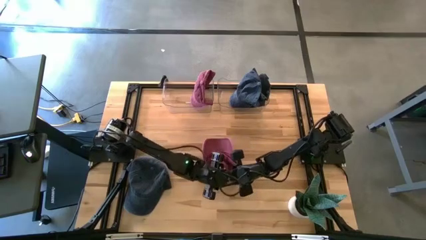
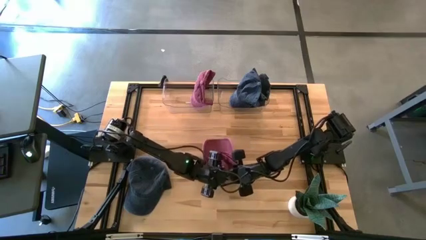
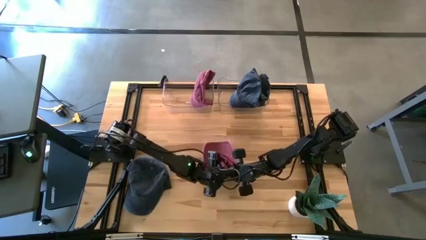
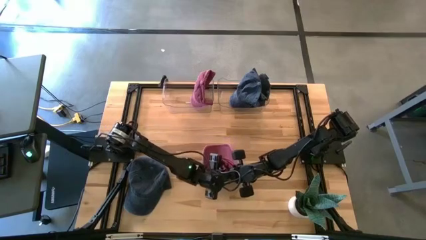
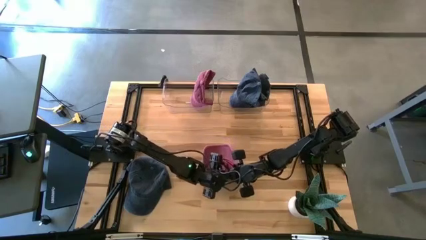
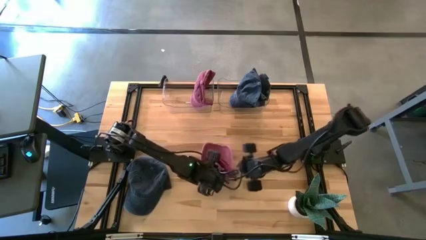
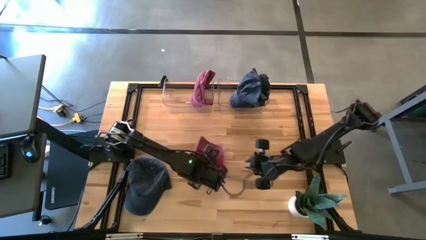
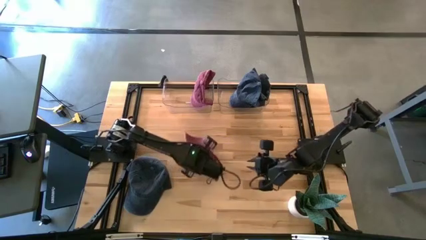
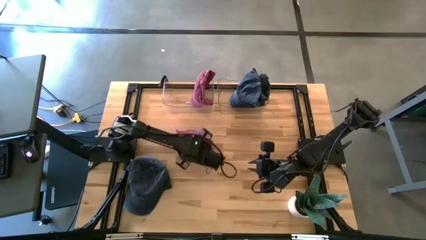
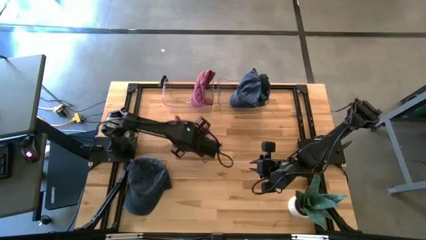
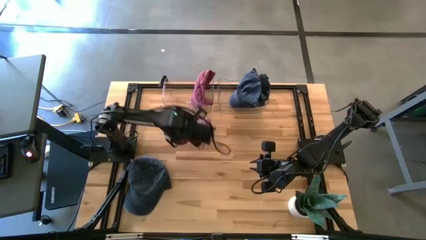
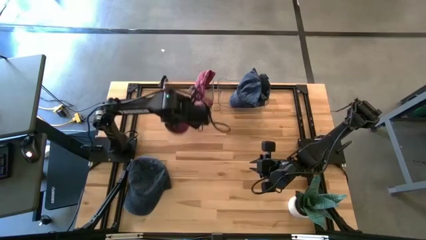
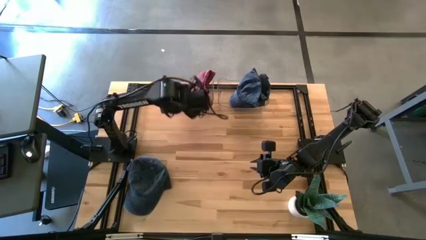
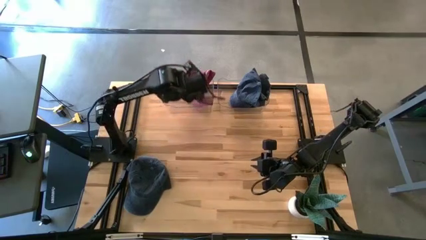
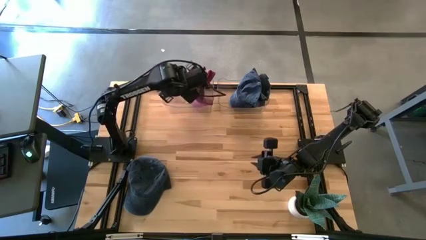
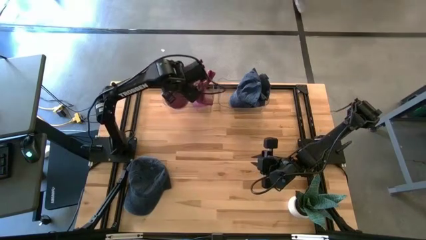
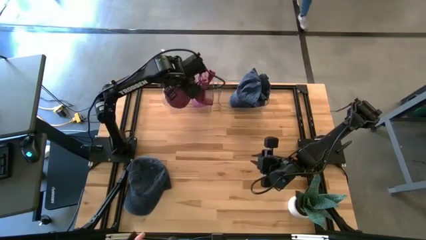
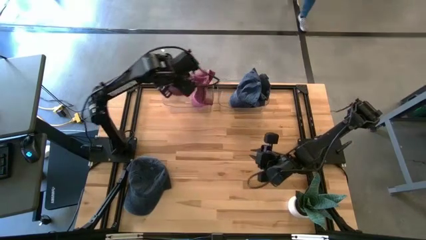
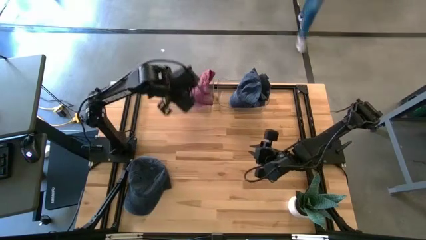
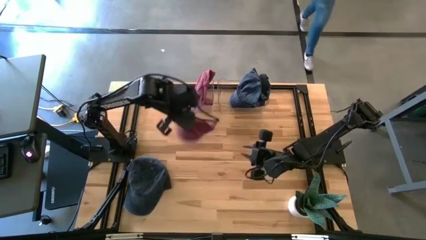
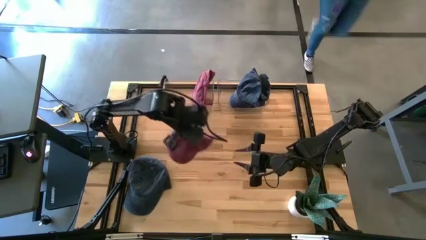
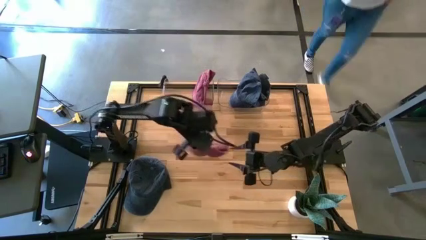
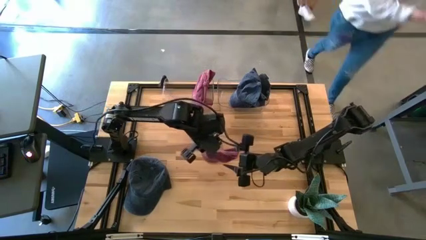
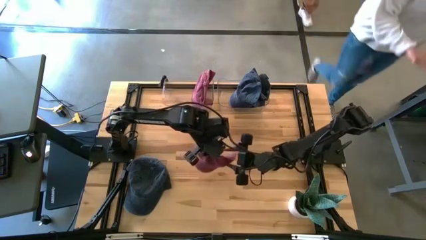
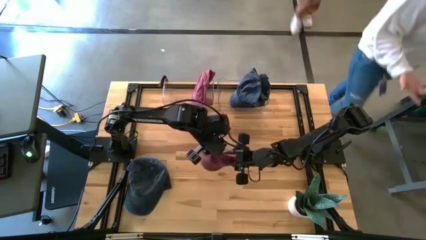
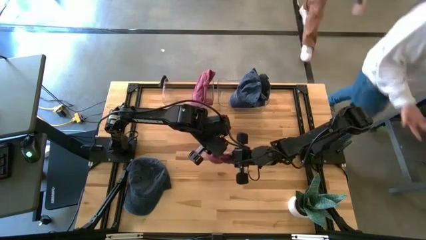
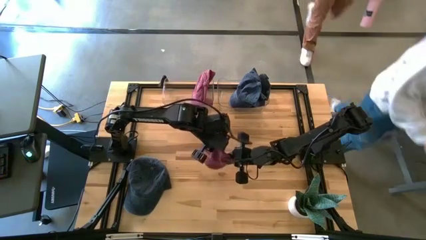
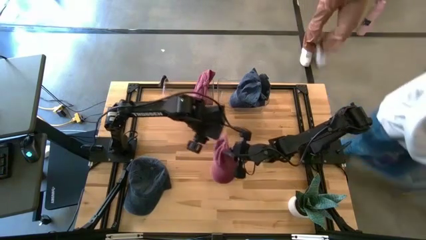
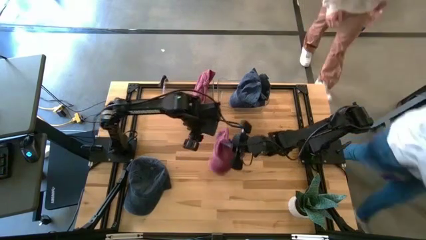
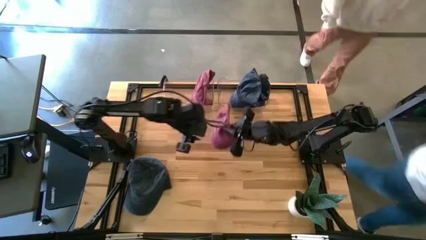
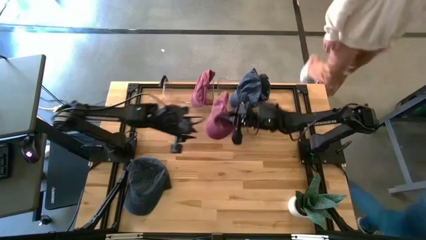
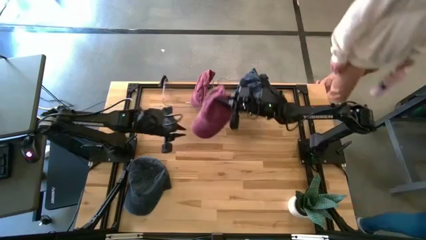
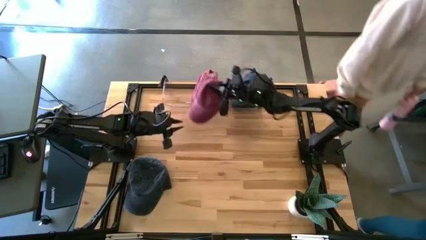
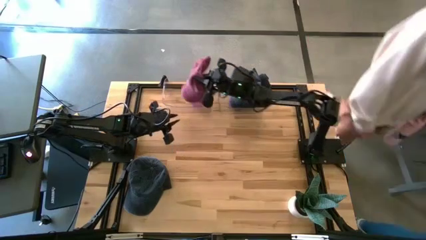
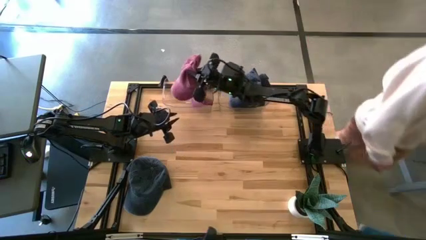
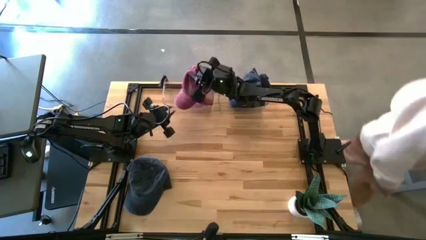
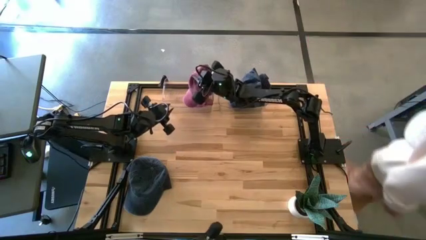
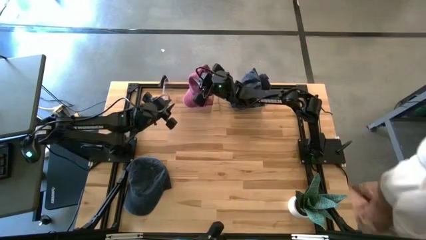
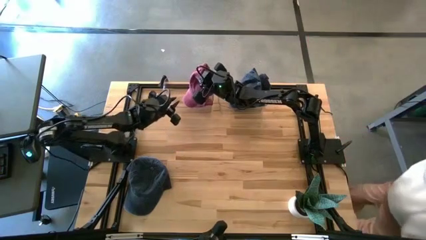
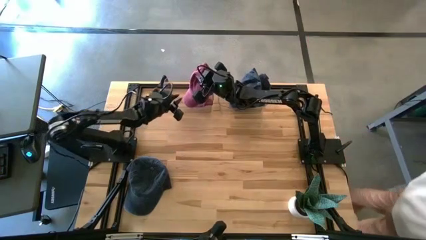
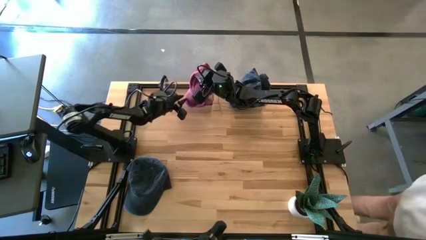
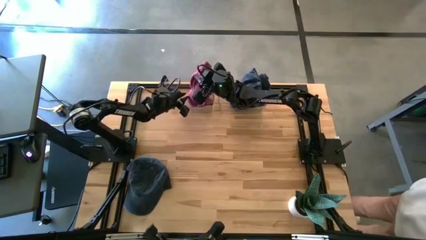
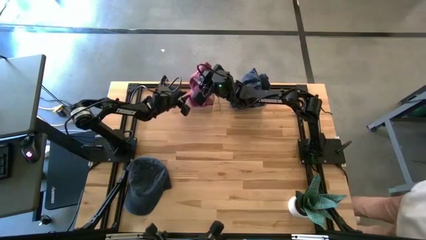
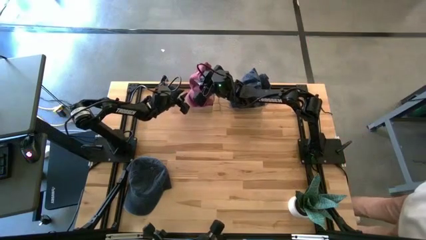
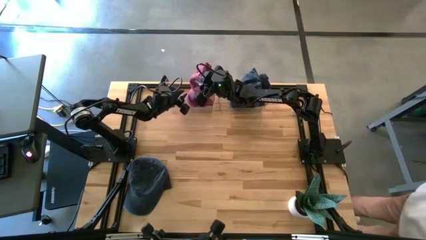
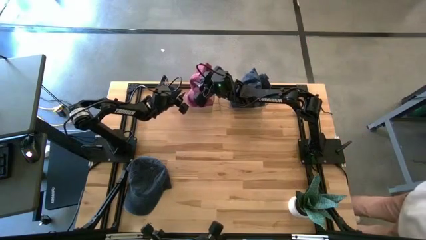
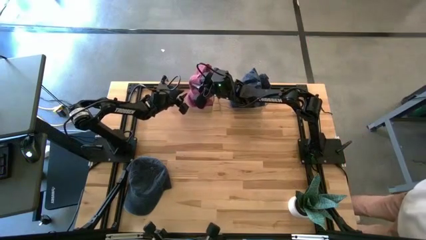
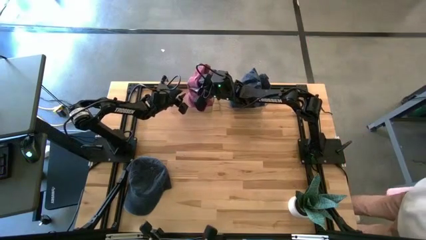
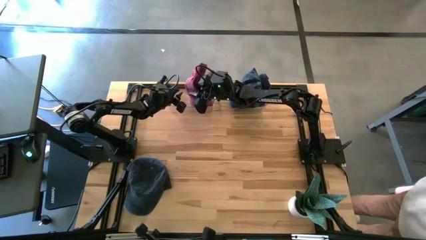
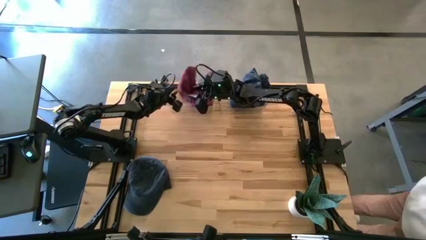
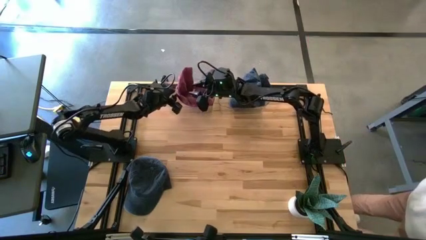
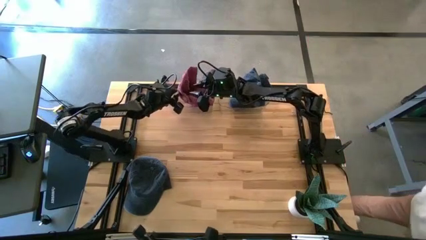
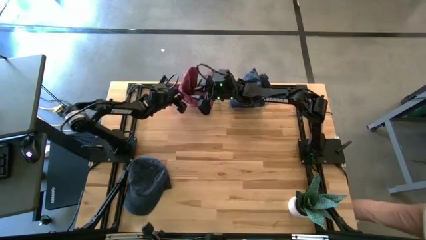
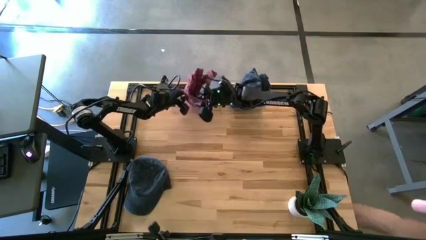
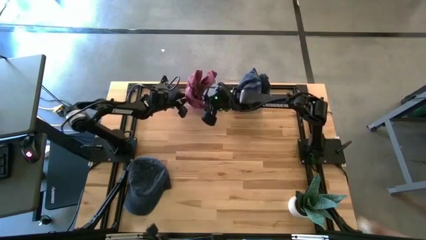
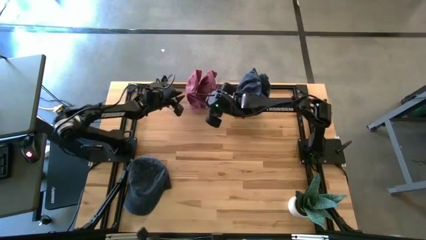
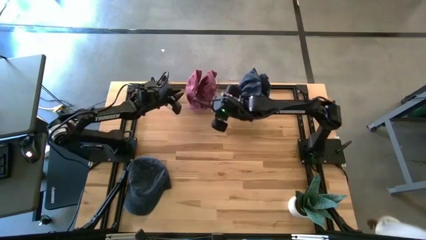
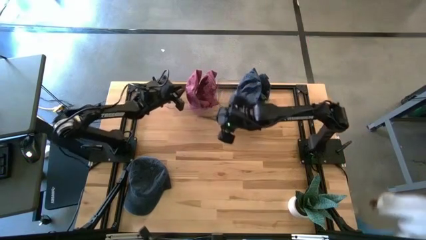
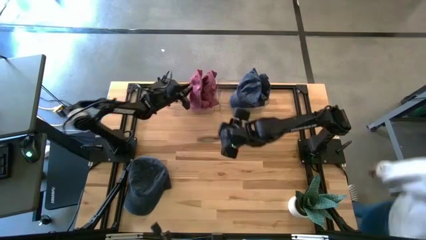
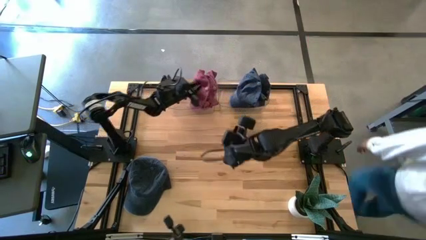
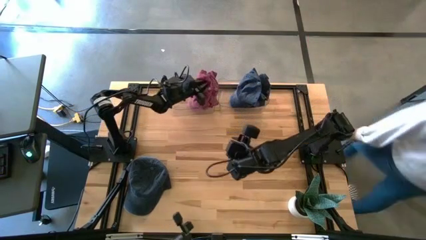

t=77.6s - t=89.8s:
Task: Pick & Place hat
Put the red cap into the left transparent bin

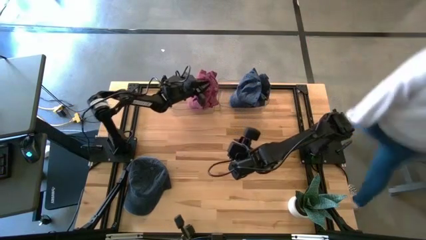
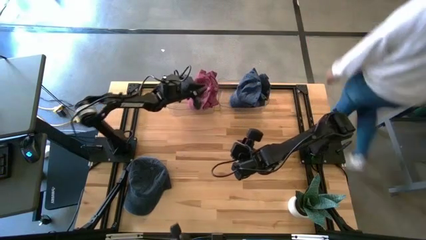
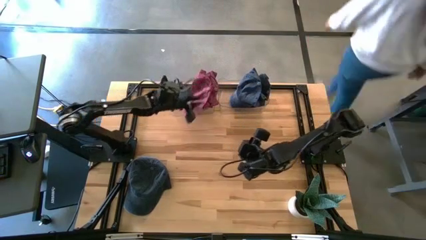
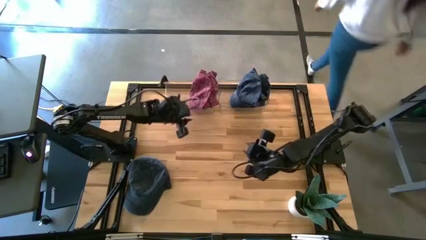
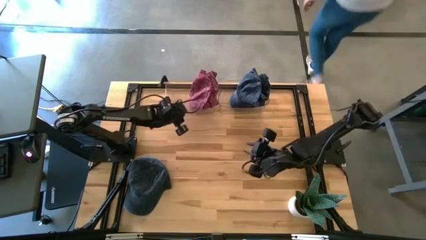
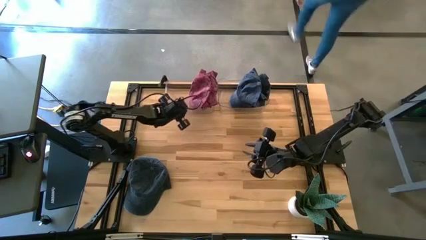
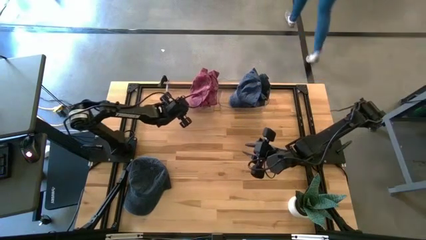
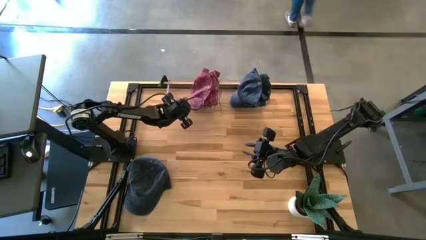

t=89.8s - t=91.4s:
Adjust the left transparent bin on the table

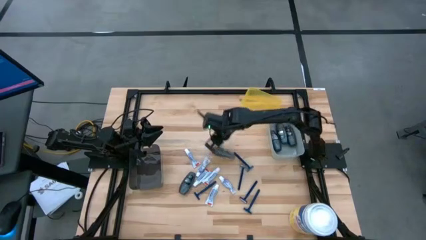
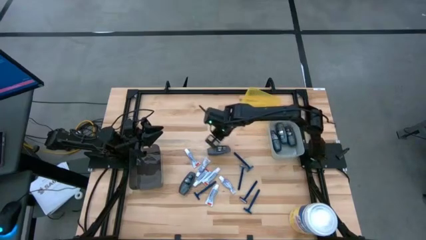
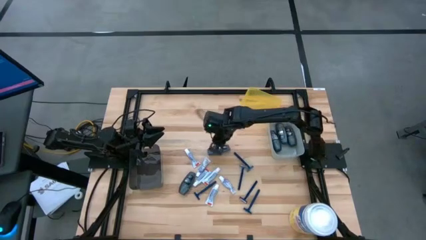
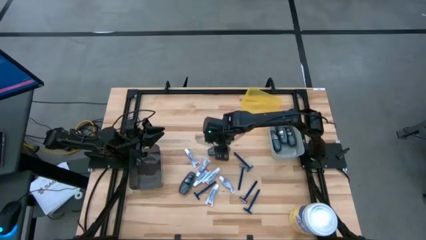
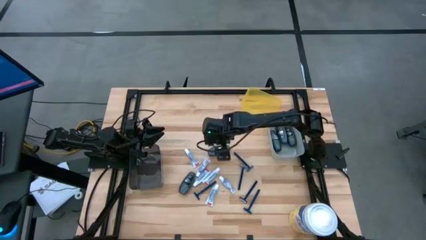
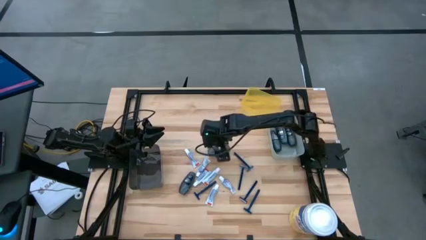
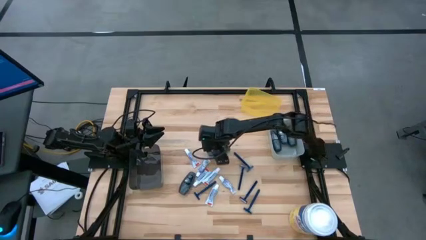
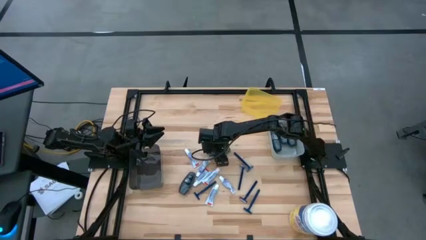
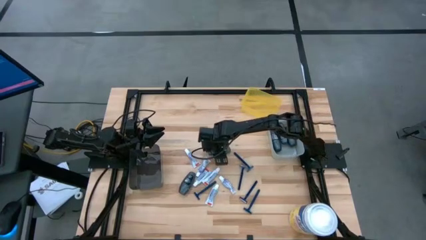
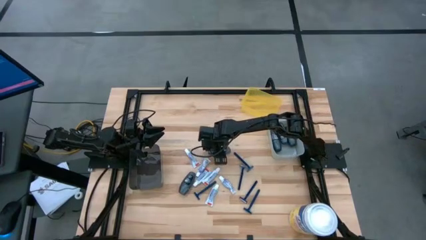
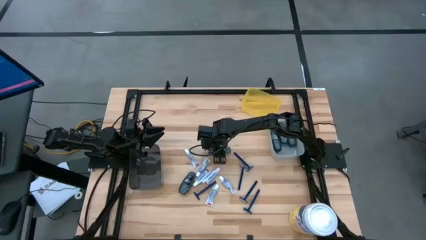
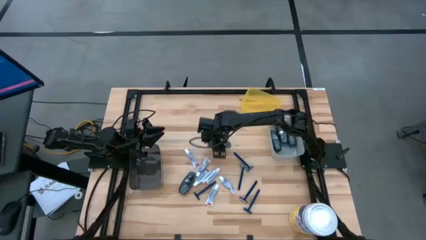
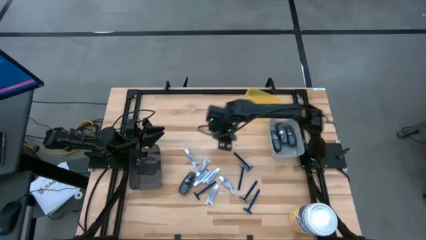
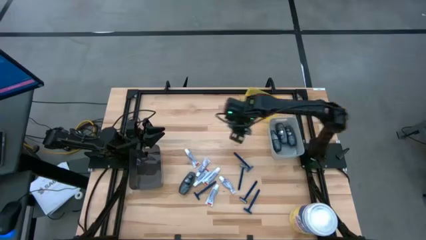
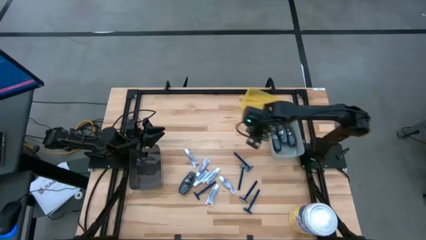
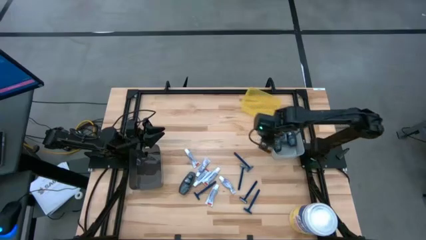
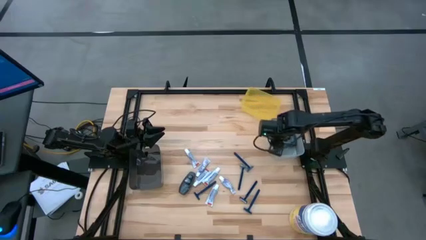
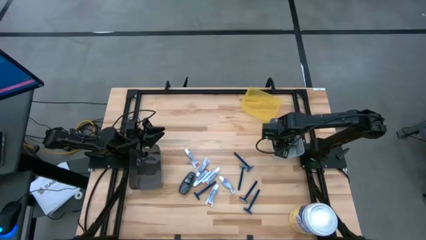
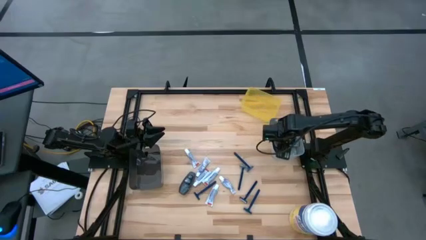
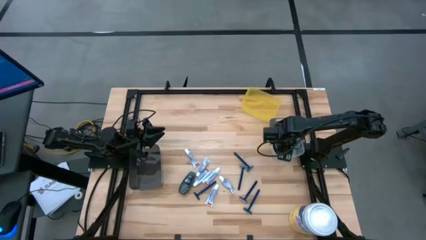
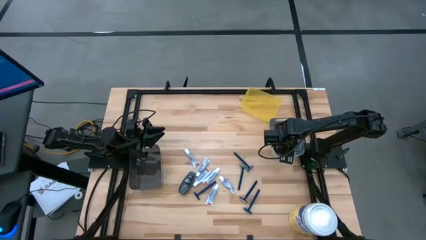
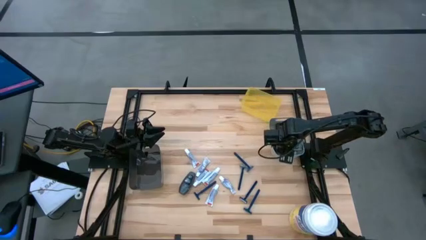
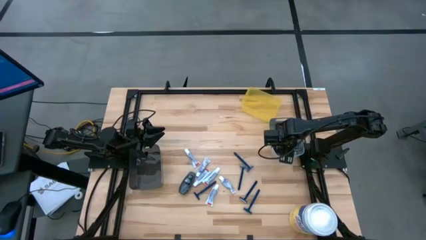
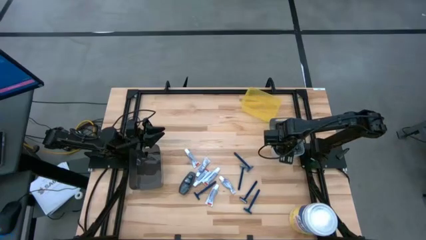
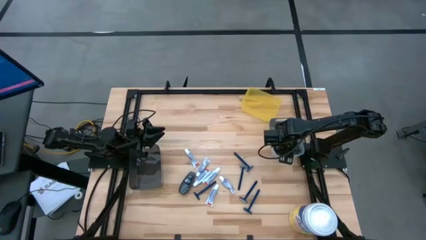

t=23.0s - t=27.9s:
Task: Pick & Place Travel size toiletries
Put the gray deodorant bottle into the white bin
